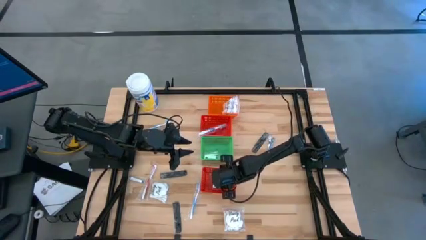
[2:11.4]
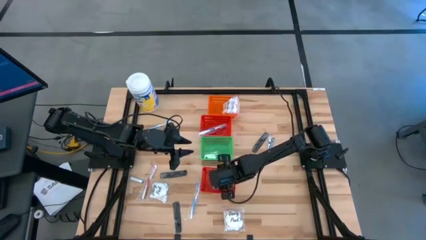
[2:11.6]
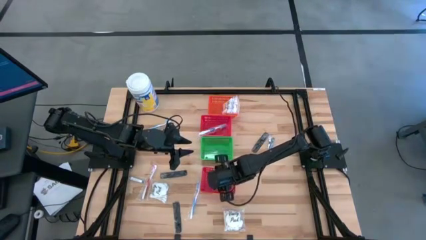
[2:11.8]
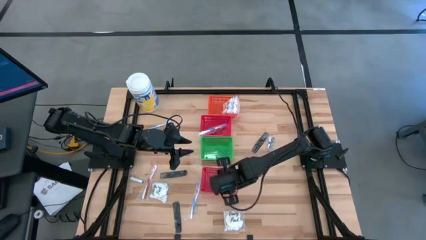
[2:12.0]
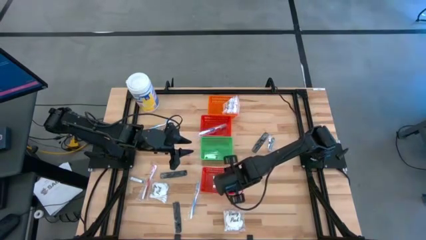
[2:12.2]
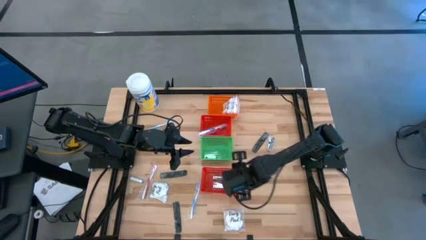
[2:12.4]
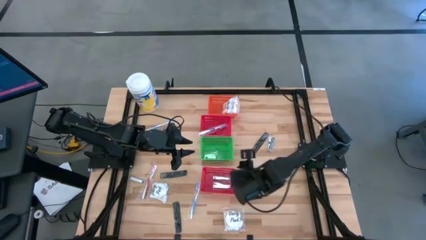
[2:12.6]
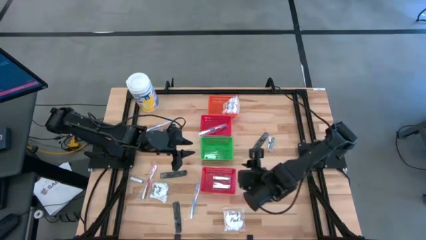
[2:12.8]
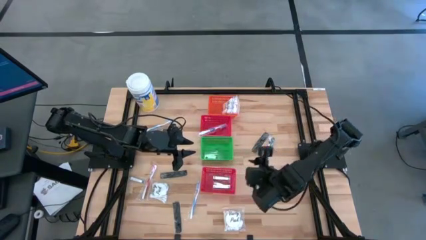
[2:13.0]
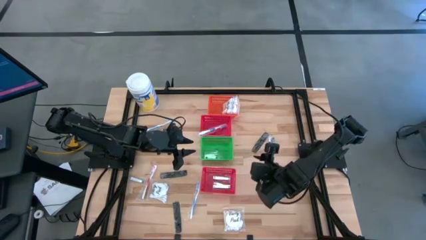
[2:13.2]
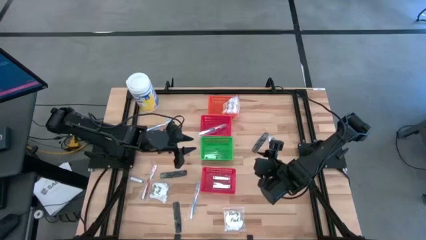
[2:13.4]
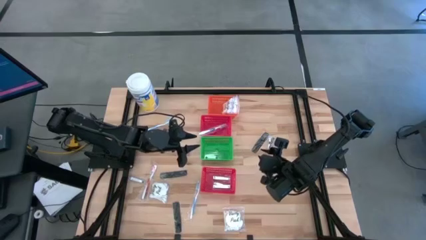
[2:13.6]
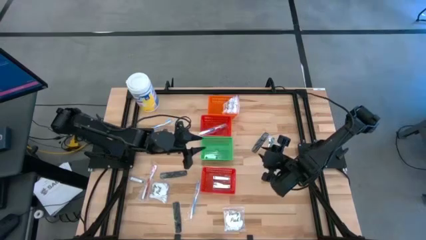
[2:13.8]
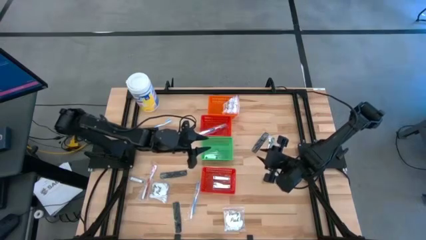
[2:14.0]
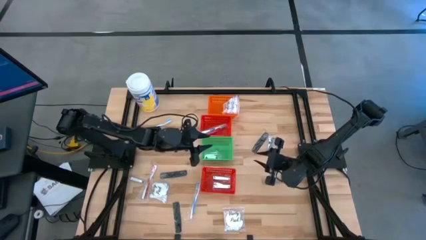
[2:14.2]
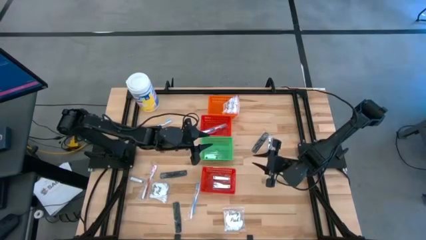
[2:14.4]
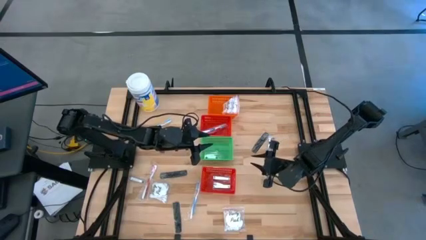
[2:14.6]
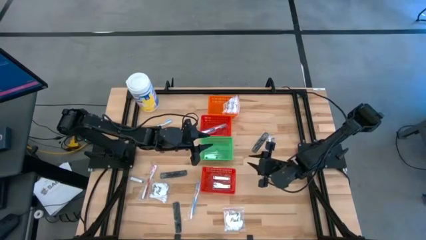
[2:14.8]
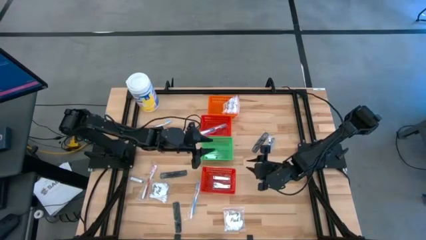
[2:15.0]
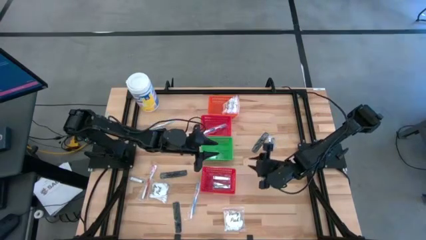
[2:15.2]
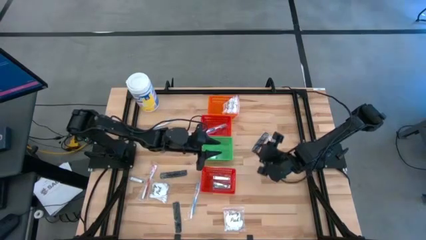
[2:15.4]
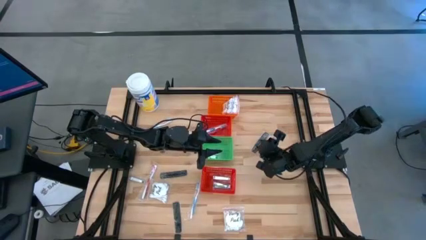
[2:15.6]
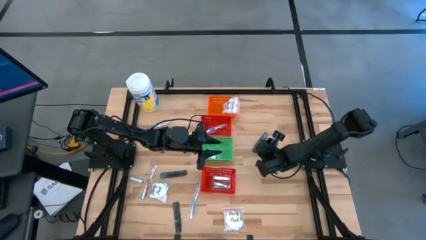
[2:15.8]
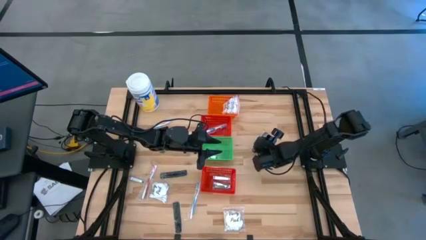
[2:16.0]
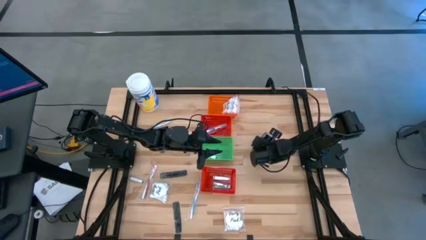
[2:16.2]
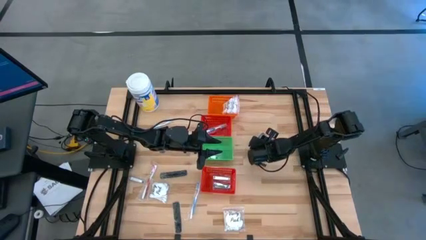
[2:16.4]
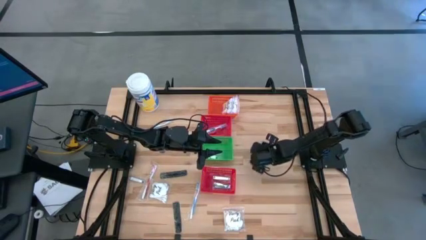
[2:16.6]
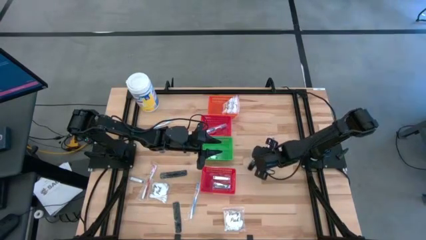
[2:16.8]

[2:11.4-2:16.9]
Task: Pick & Place Travel size toiletries
Adjust the black comb

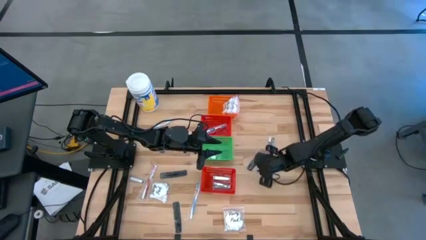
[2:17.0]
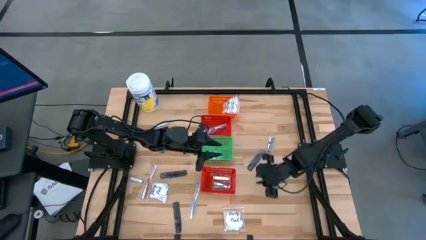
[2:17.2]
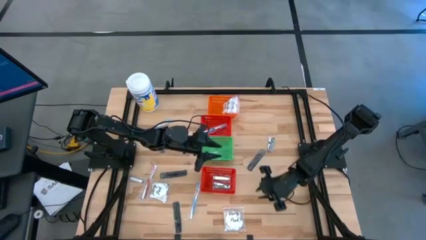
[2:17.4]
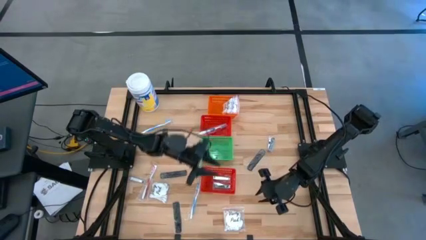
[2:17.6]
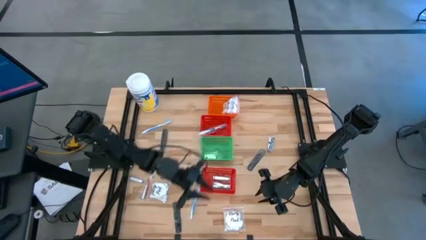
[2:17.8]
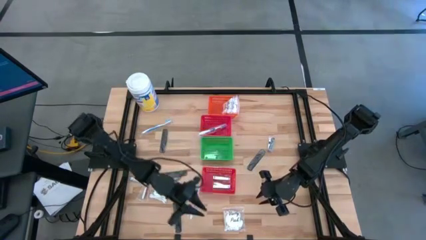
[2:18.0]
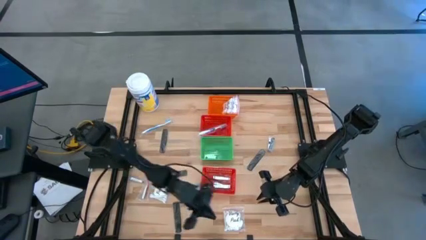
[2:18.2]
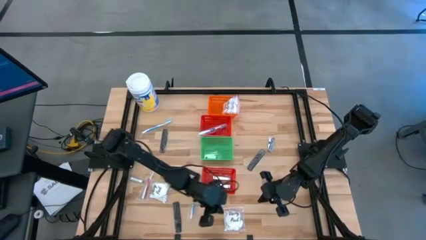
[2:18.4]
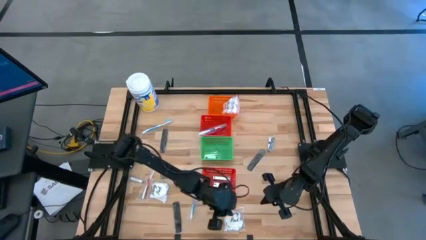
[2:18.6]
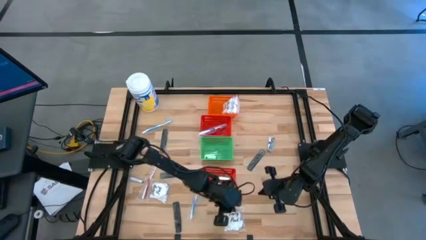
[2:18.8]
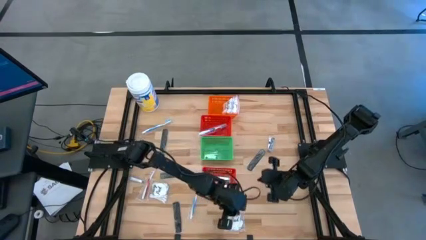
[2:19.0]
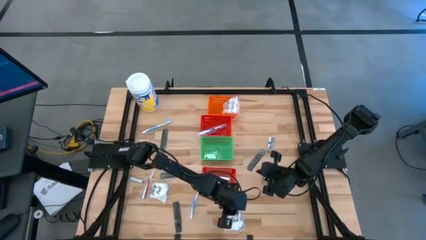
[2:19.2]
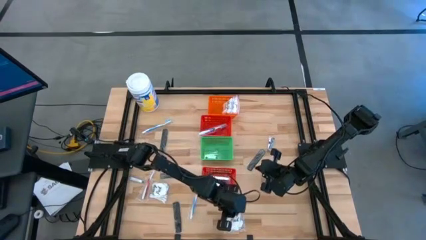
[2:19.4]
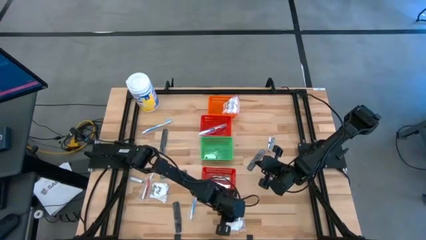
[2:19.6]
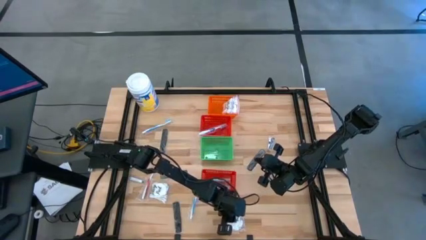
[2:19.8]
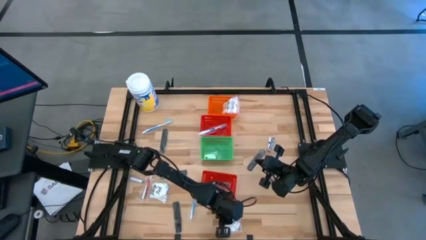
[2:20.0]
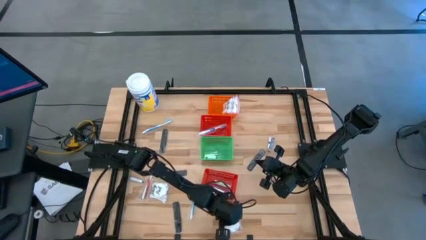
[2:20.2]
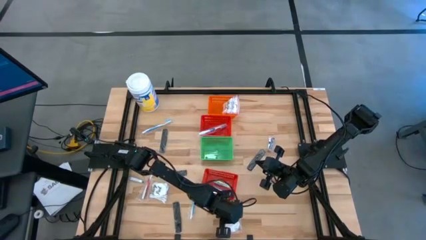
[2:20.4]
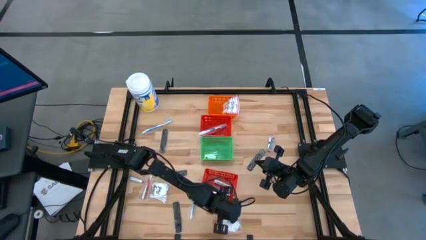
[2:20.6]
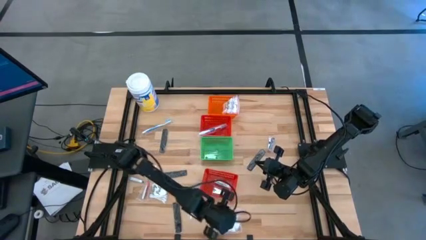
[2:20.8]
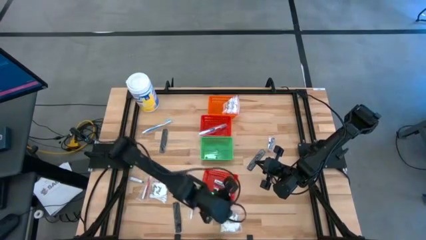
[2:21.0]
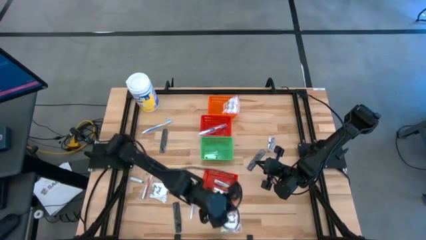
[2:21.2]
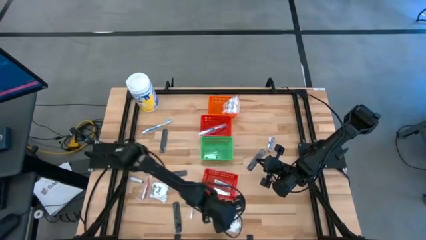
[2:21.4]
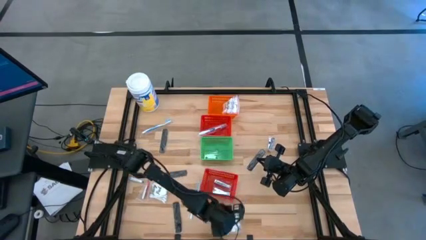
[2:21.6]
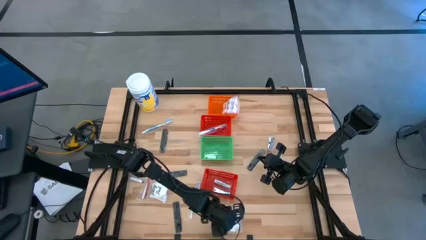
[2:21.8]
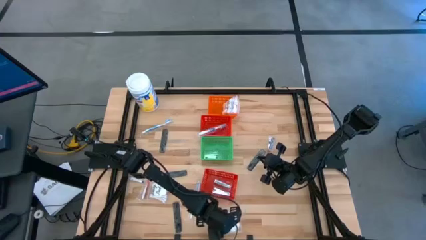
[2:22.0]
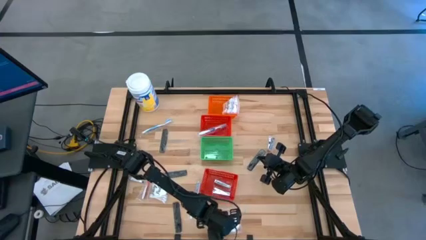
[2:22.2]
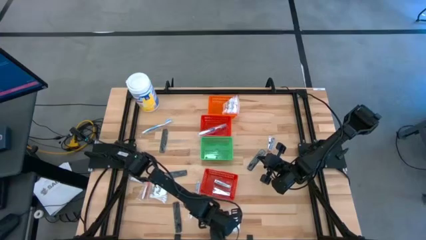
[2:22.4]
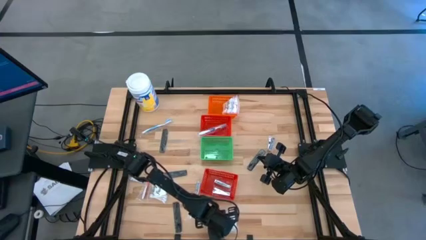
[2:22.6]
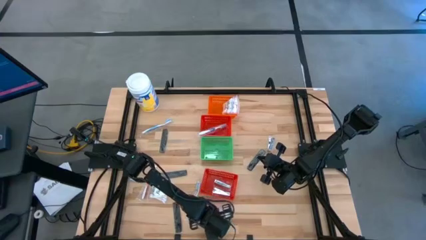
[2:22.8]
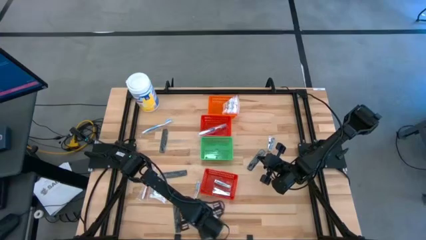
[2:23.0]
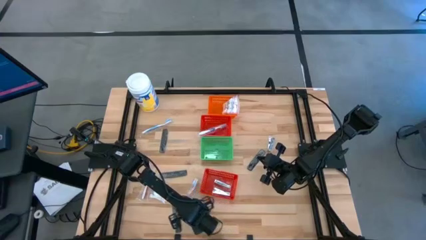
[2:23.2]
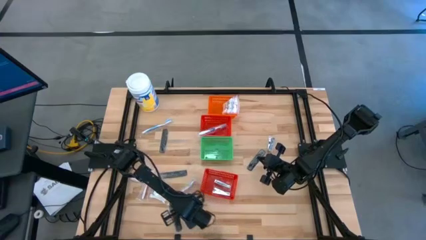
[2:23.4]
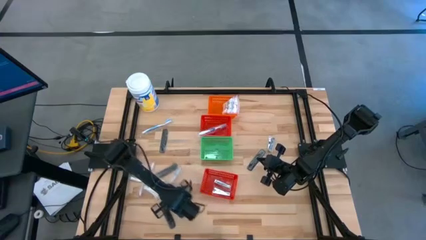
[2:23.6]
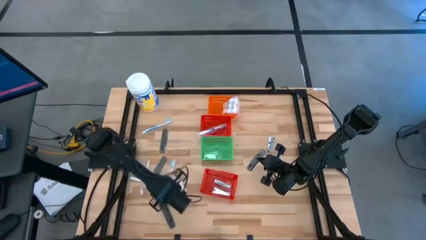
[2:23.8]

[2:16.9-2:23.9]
Move the transparent cottom pack to the bottom left of the table

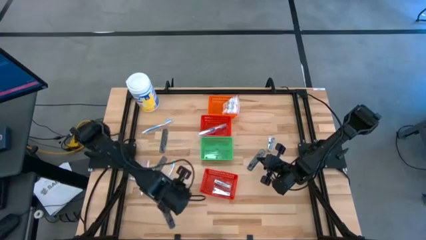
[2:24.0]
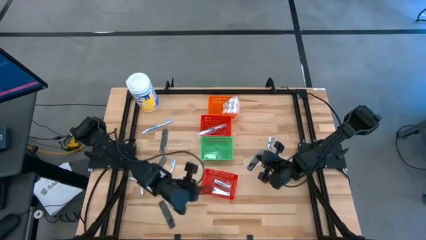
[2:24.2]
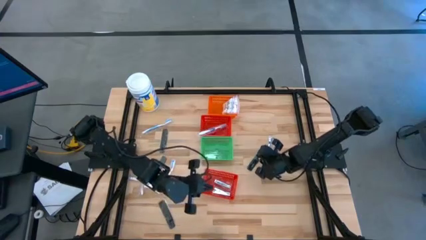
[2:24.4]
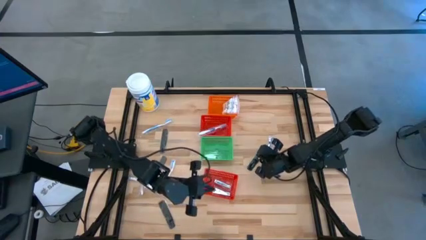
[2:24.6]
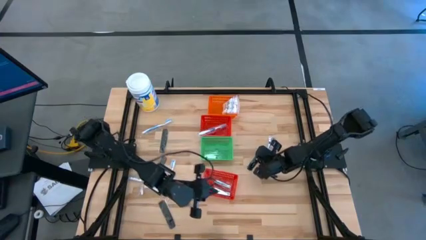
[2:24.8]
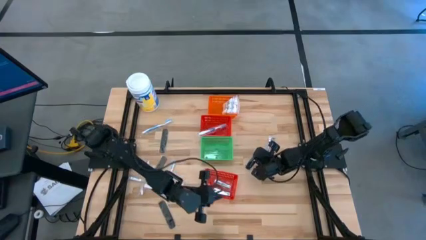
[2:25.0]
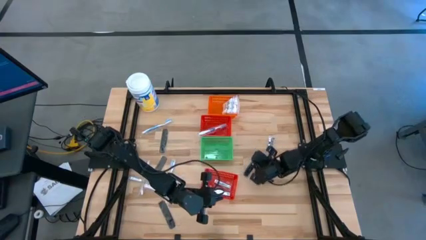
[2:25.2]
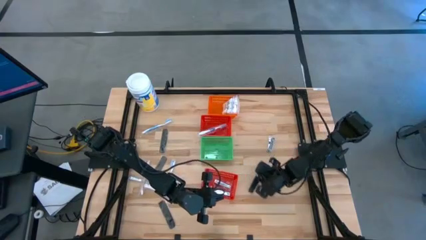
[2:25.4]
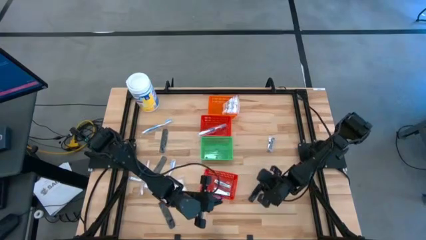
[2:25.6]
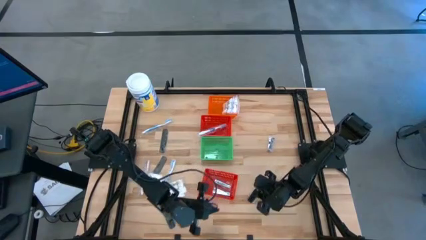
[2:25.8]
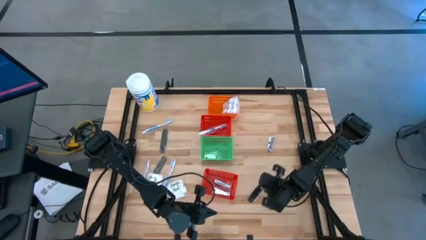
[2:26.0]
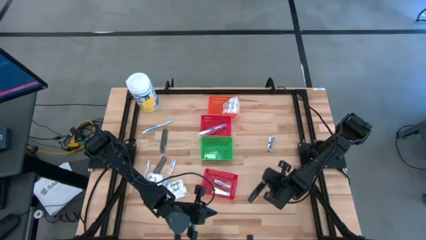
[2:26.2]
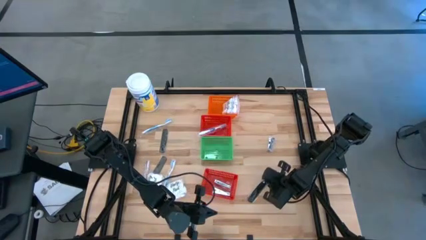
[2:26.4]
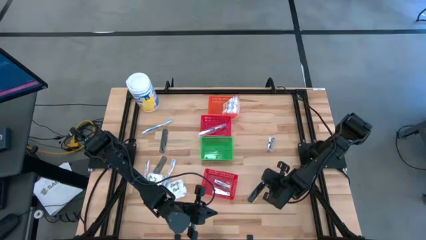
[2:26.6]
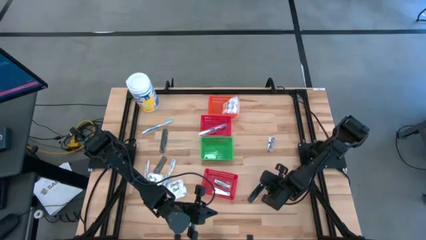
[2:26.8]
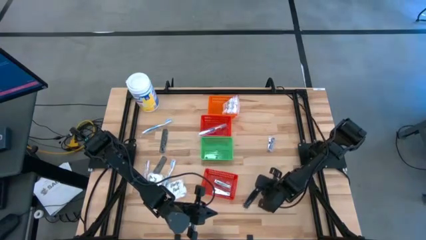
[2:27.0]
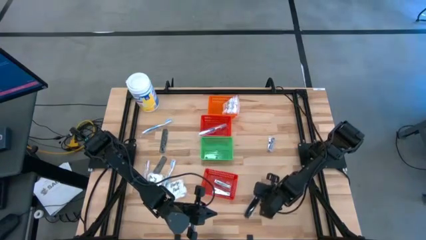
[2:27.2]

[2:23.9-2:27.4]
Move the black comb to the bottom center of the table
